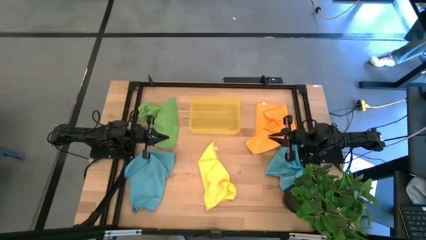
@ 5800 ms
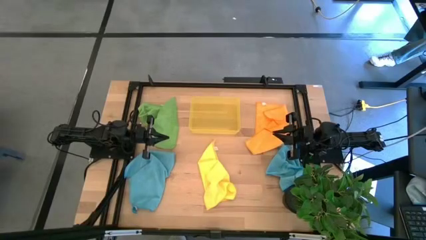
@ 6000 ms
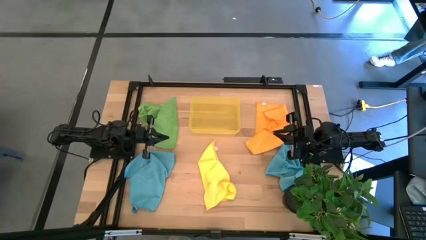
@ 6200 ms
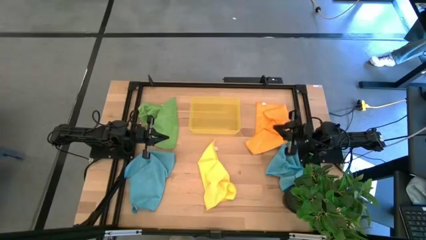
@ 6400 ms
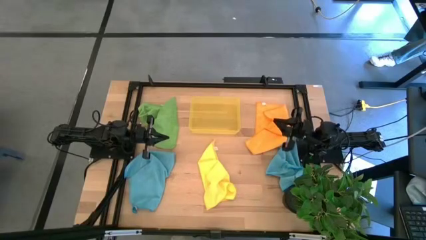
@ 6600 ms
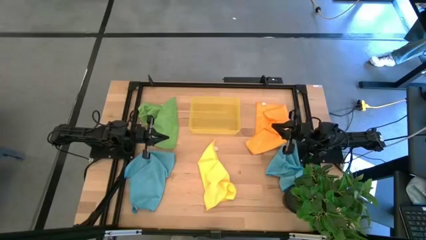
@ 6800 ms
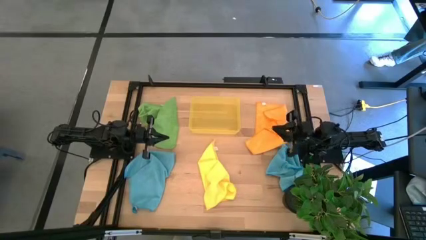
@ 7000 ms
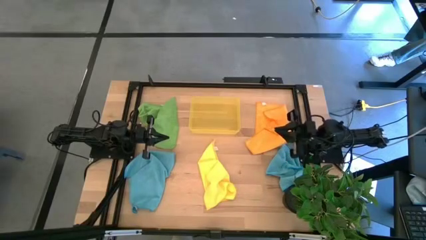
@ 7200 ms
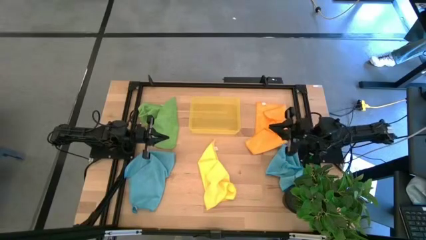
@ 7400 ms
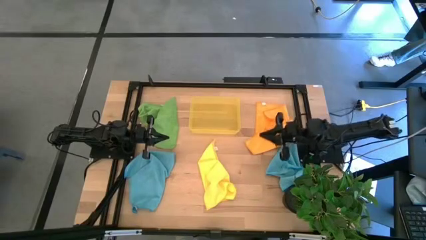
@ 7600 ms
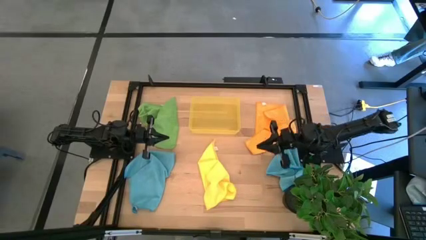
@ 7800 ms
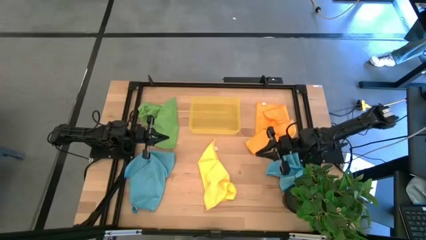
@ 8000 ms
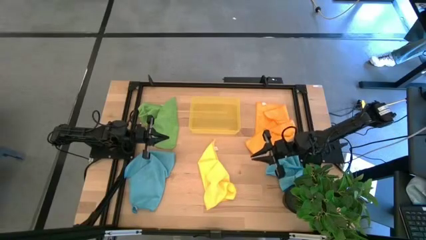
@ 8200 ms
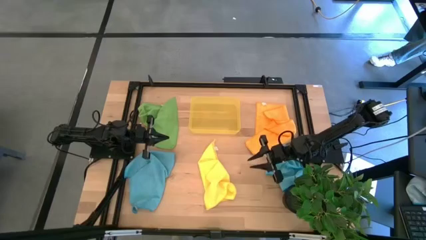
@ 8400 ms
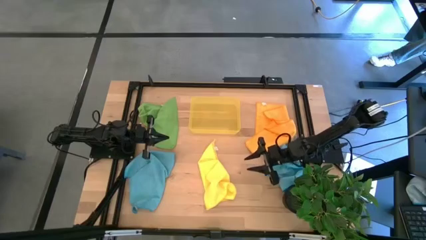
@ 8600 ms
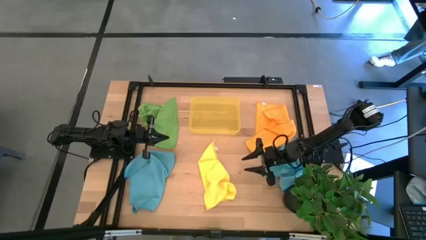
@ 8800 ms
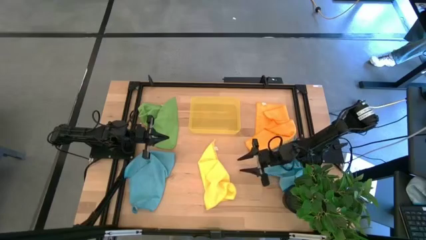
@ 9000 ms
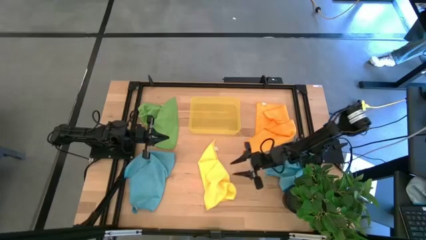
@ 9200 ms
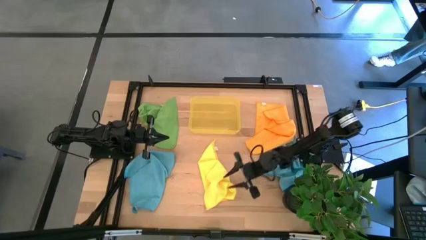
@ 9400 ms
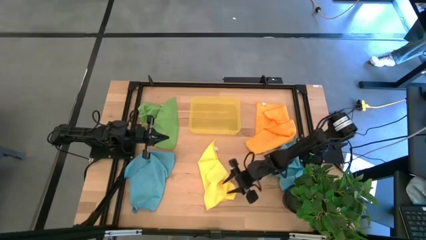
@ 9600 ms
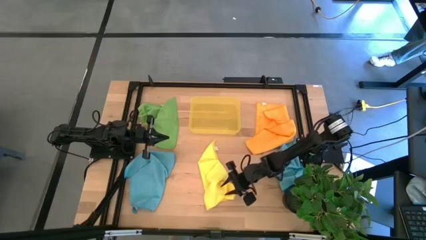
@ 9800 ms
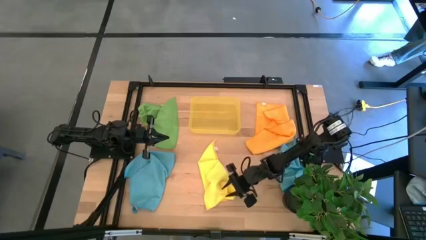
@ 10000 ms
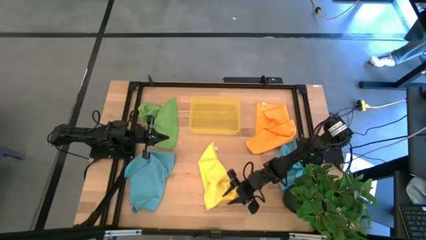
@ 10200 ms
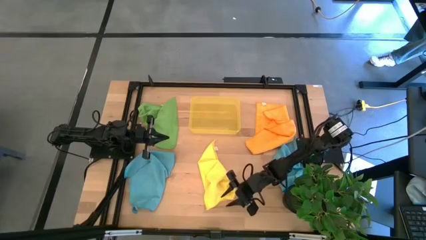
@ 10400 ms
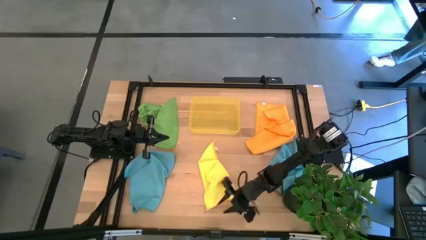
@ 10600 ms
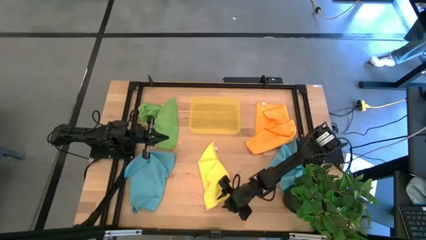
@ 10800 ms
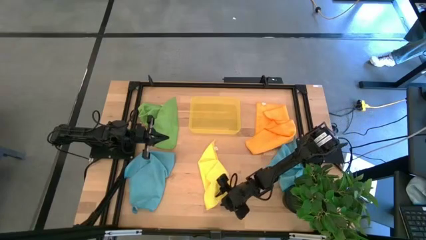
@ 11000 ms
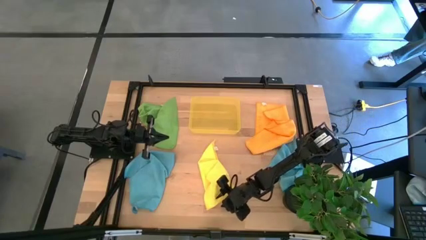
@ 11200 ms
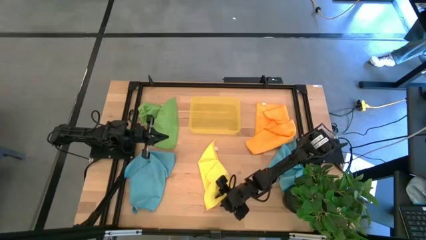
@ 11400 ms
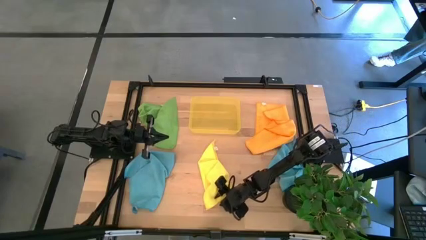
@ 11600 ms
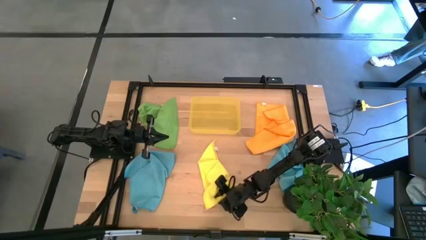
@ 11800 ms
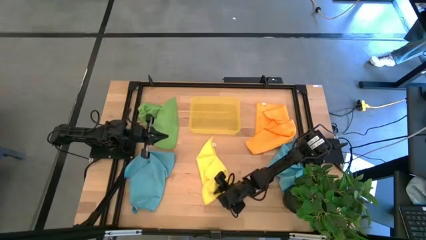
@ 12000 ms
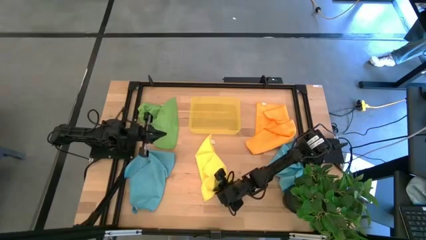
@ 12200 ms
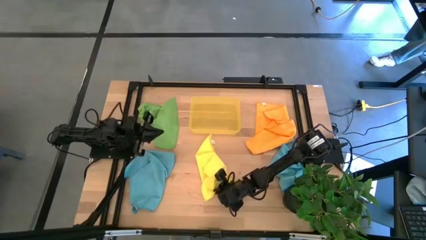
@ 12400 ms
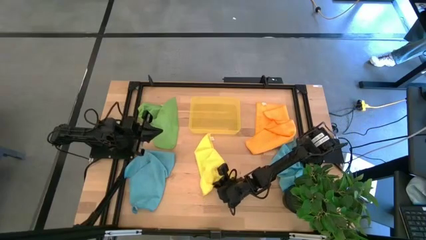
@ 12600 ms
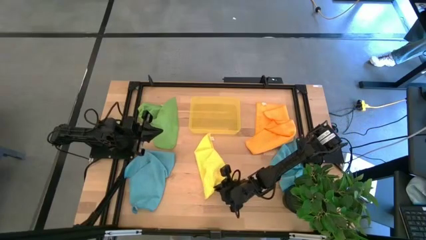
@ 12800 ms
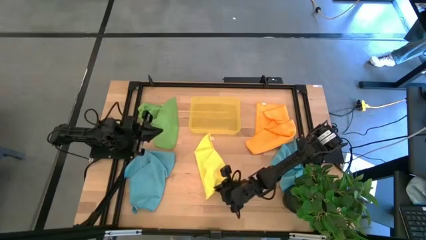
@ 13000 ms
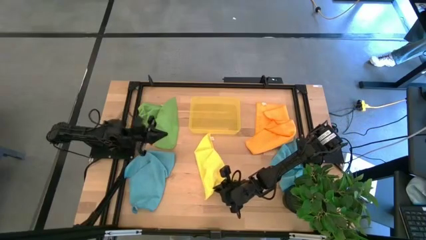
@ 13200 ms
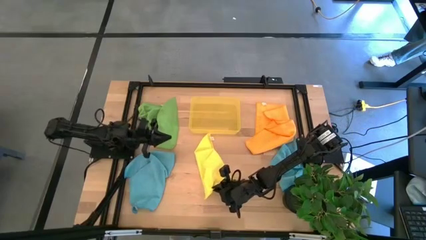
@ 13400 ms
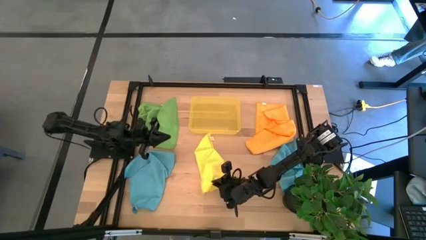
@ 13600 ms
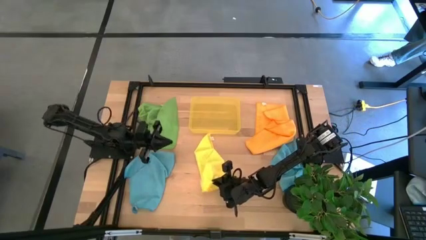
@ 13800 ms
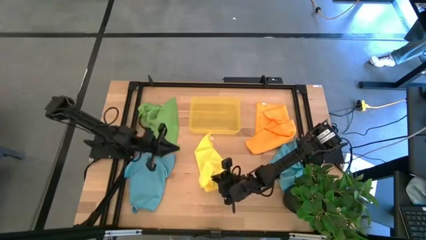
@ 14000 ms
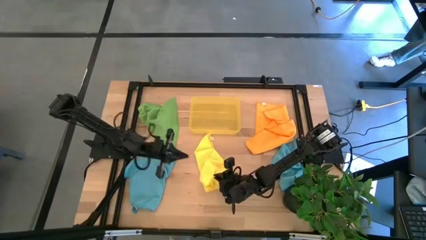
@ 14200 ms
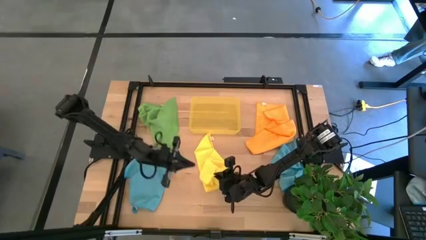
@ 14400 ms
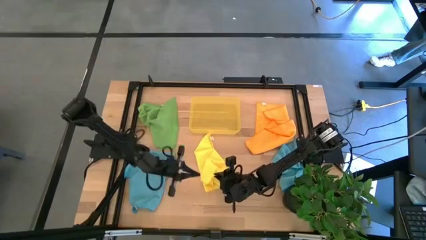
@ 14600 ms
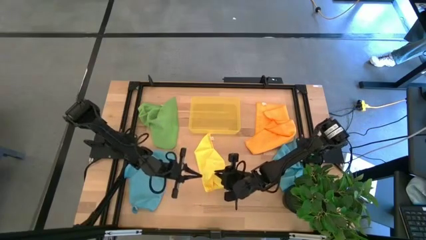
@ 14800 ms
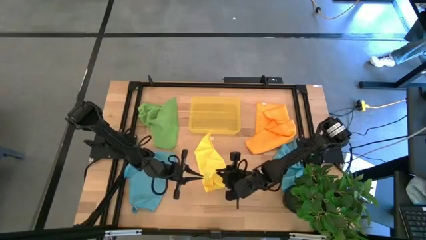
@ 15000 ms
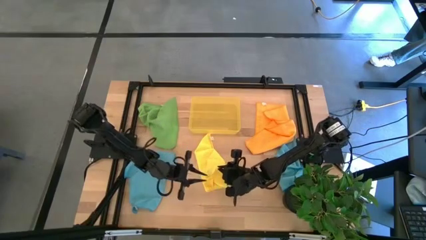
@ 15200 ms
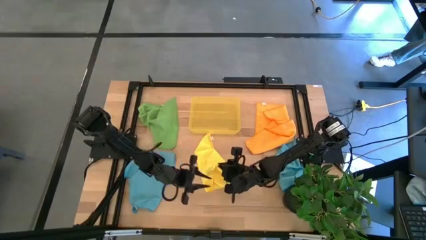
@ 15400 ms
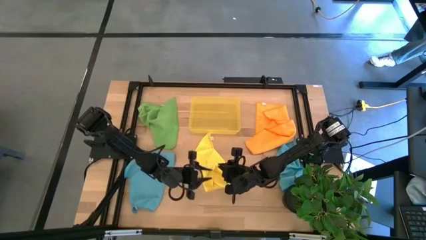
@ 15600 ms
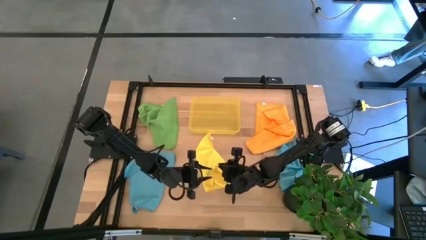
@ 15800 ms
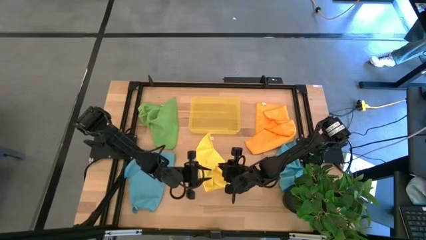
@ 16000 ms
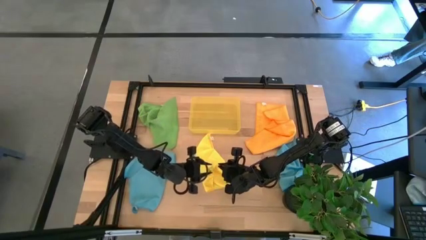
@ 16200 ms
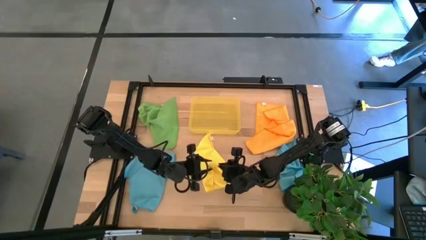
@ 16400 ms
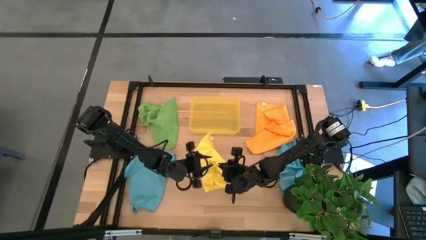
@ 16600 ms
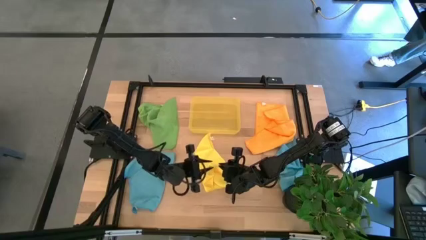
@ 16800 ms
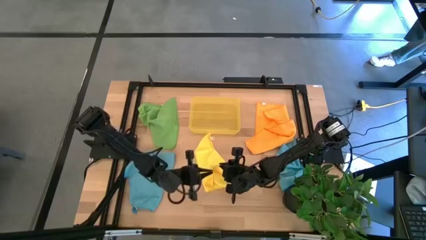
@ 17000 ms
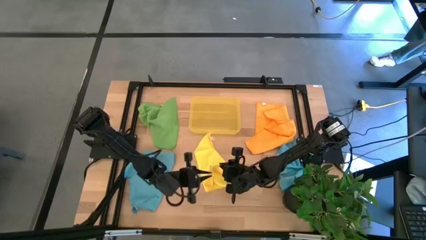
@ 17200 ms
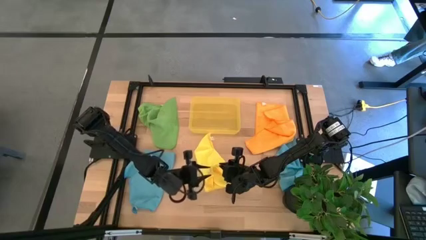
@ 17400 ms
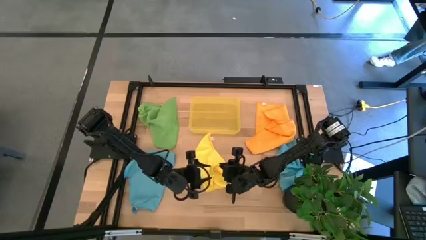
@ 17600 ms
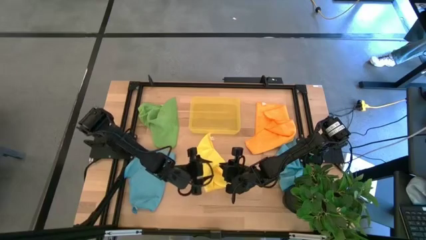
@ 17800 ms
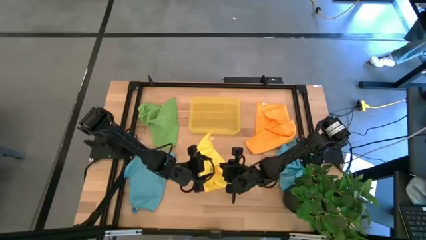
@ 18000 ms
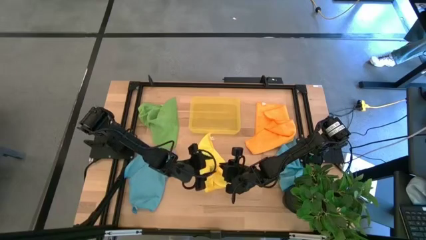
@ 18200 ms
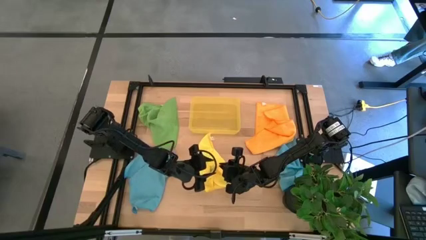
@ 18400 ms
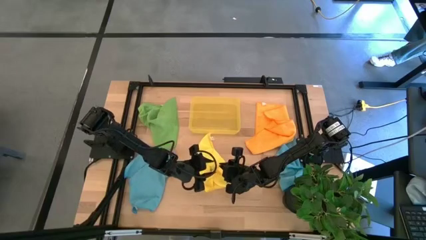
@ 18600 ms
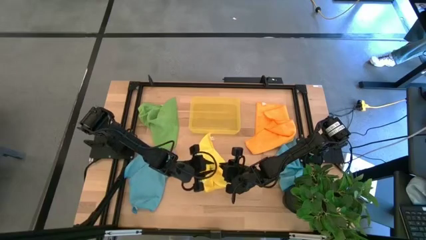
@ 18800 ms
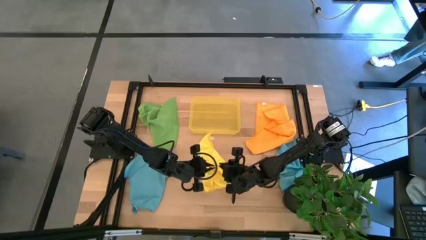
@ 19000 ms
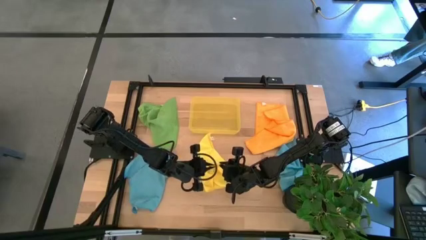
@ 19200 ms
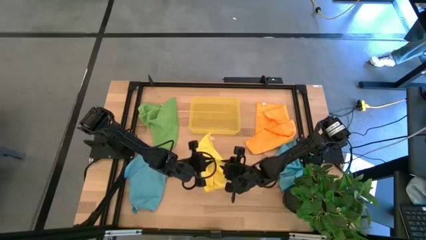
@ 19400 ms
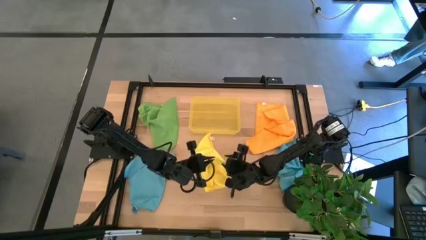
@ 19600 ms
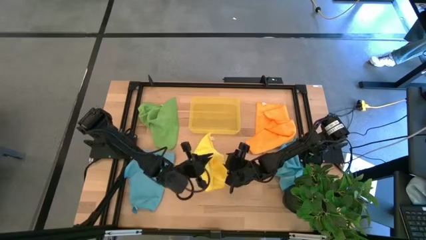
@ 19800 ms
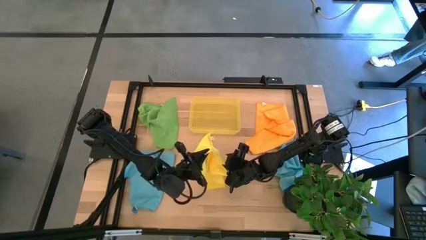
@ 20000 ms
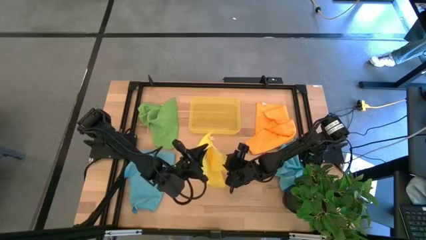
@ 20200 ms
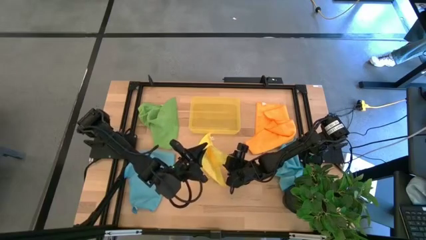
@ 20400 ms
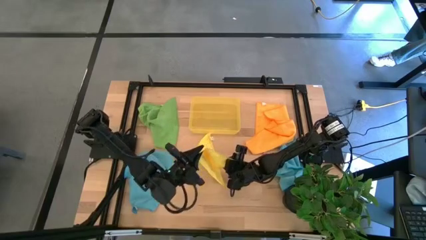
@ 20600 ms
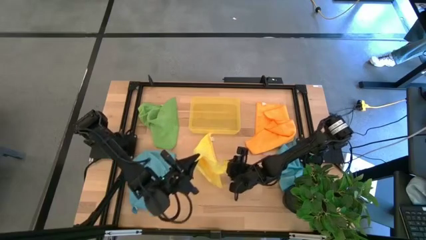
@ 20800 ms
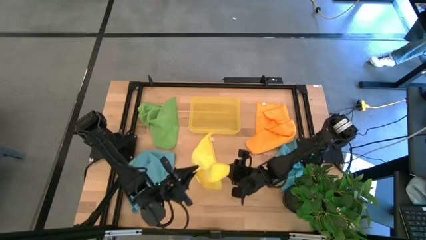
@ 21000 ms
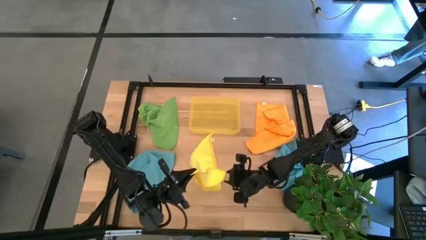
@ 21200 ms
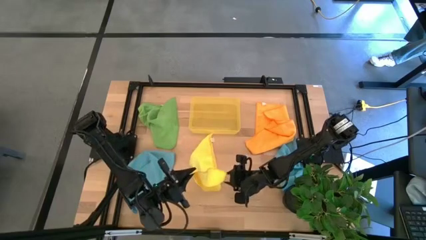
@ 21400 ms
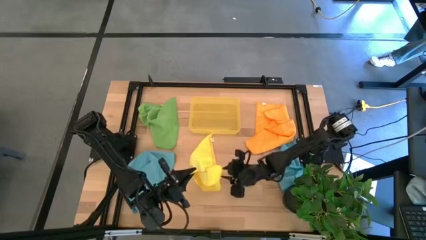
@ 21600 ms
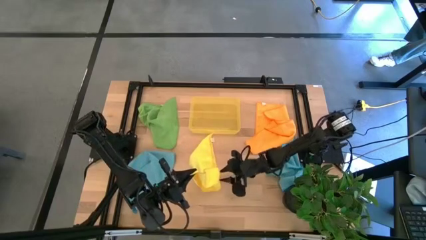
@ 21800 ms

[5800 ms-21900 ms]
Task: Fold microfiber towels
Fold the yellow towel
